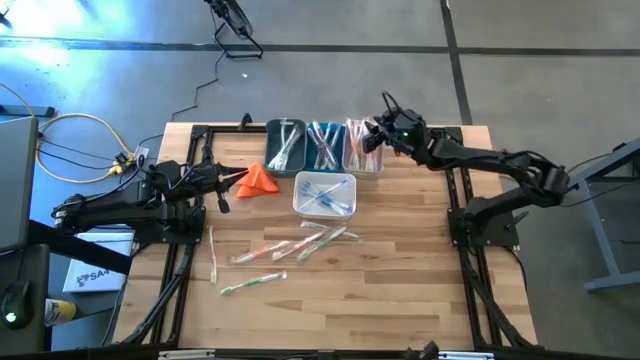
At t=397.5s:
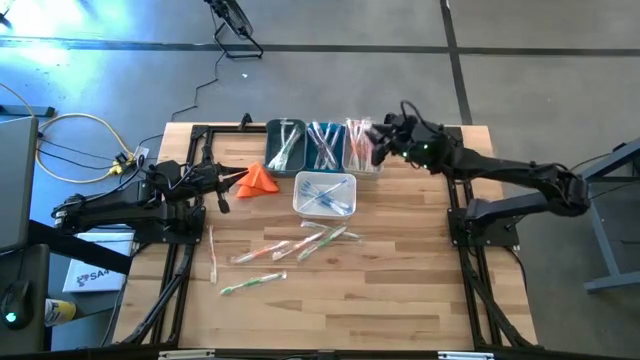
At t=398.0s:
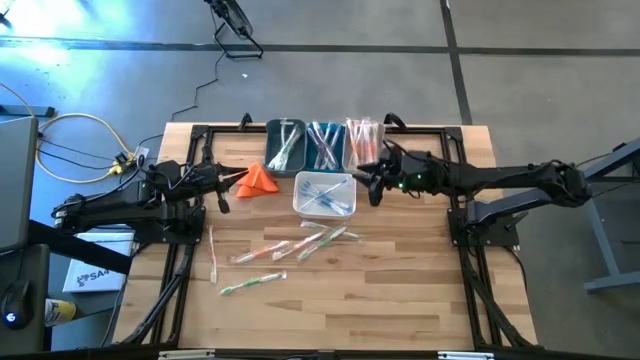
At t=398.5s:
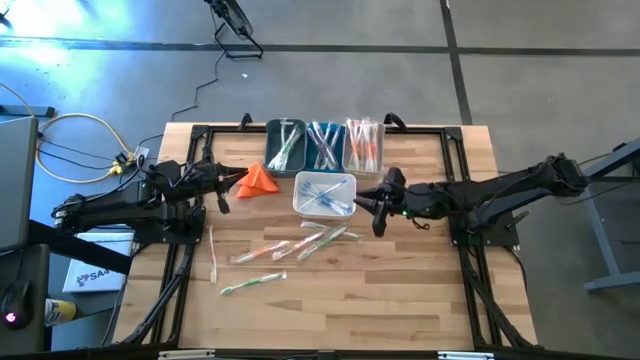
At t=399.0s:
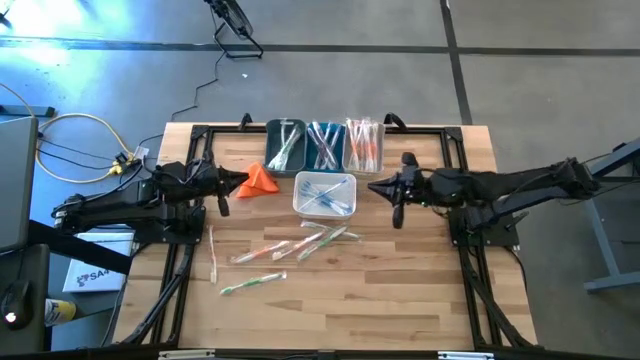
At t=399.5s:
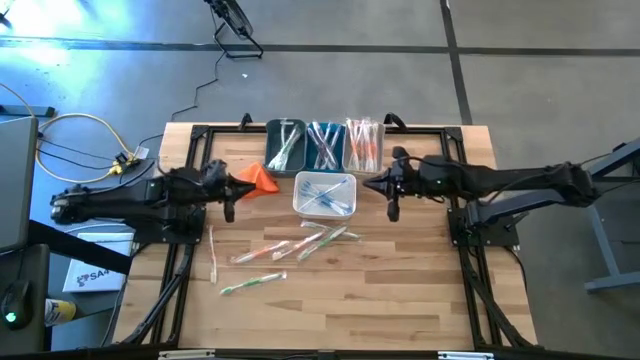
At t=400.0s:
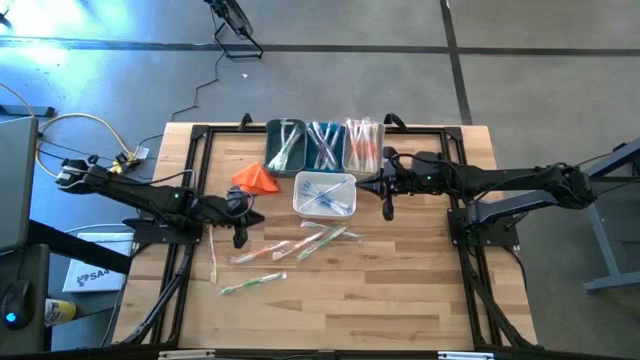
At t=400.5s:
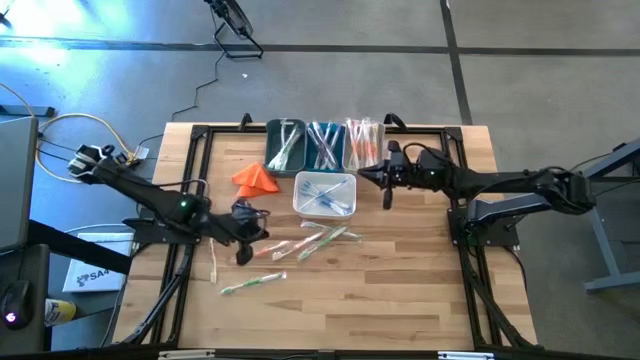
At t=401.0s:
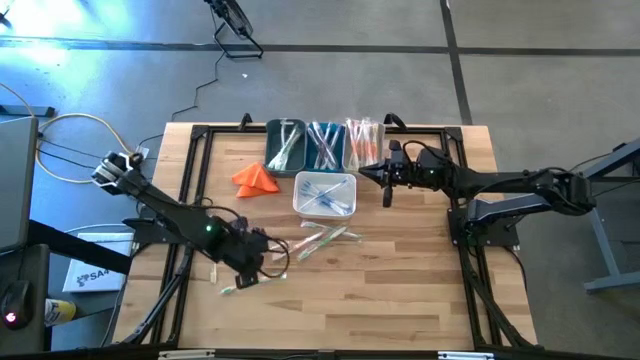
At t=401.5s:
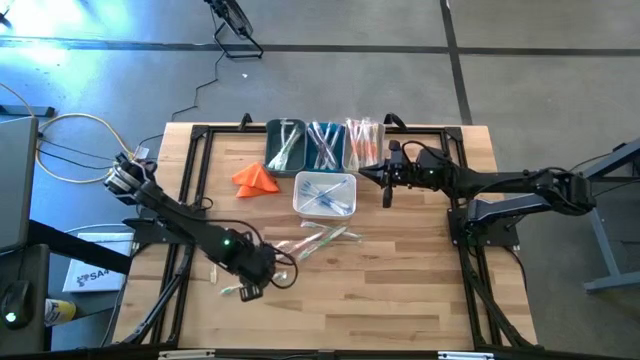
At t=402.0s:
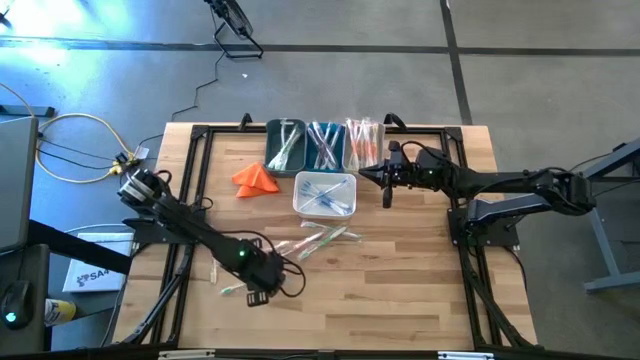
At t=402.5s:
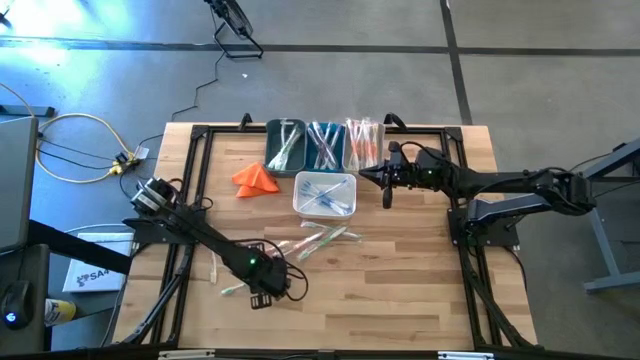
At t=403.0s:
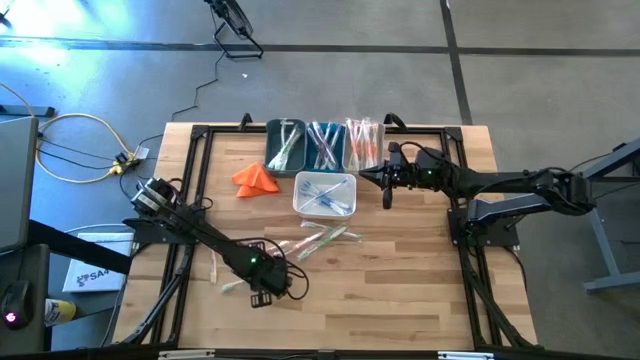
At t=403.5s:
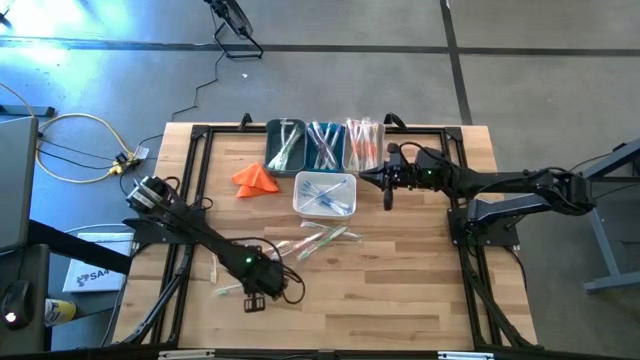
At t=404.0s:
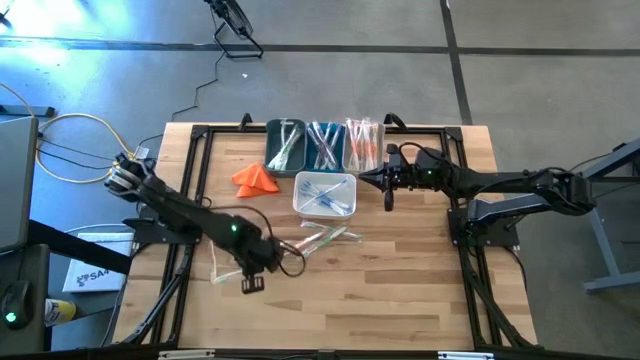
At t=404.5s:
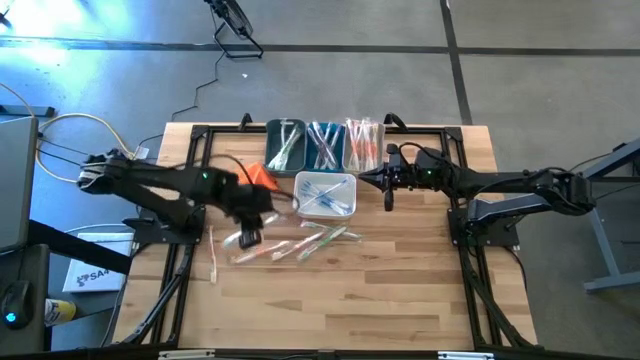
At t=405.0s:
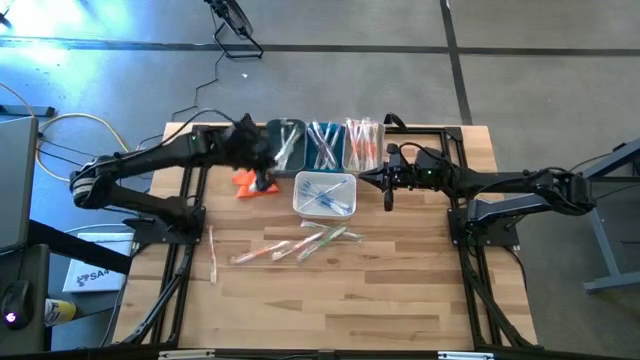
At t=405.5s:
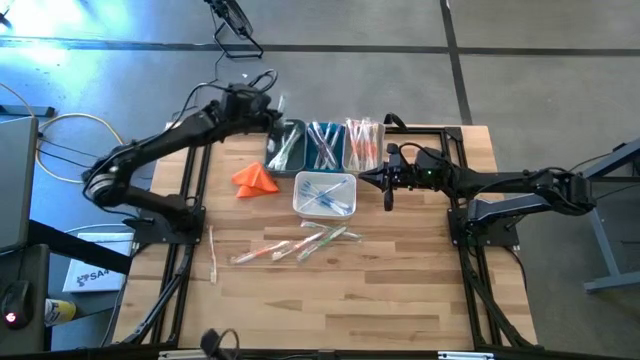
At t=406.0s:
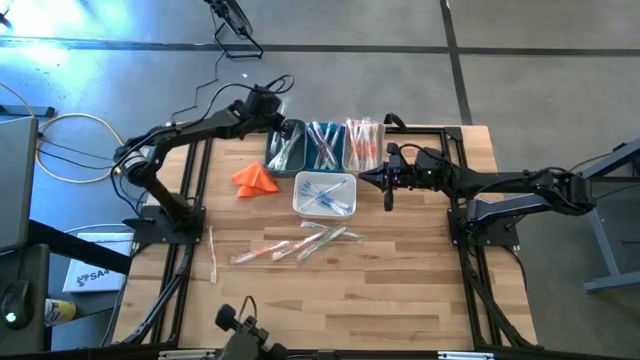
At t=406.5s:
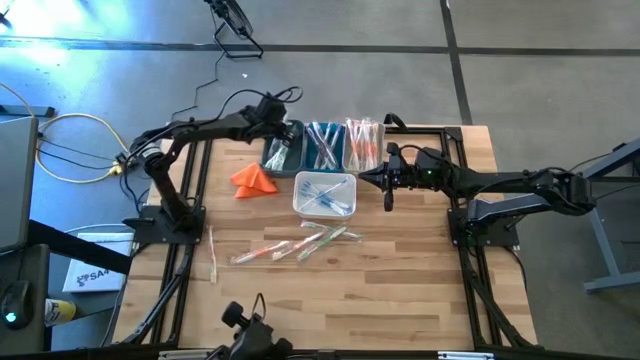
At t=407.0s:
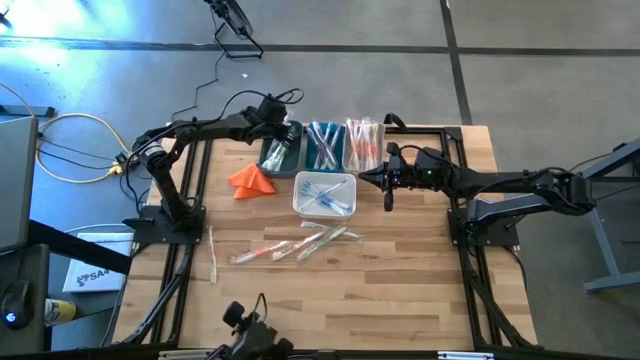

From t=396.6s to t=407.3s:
Task: Pick & Place Toothbrushes
Put the green toothbrush into the dark blue bin

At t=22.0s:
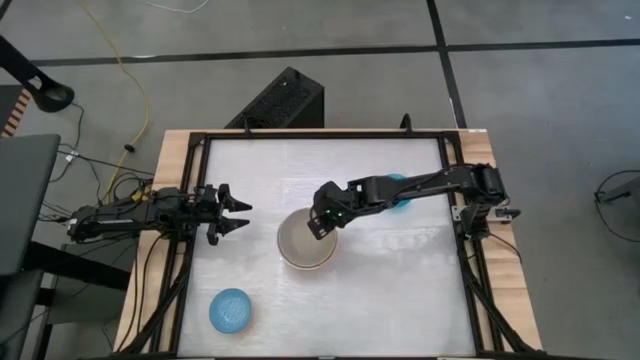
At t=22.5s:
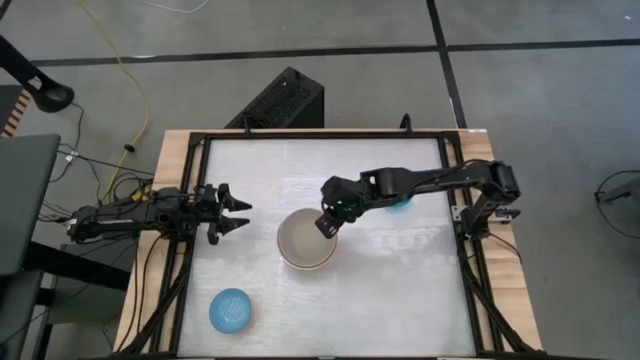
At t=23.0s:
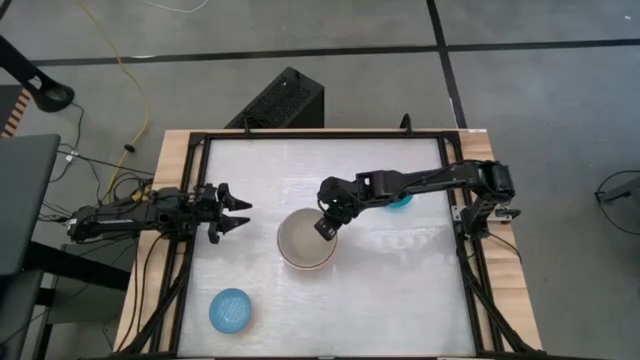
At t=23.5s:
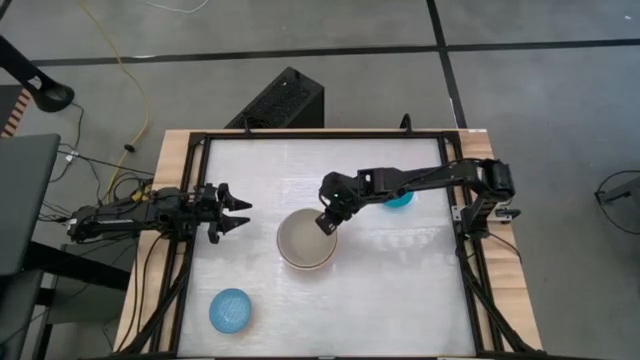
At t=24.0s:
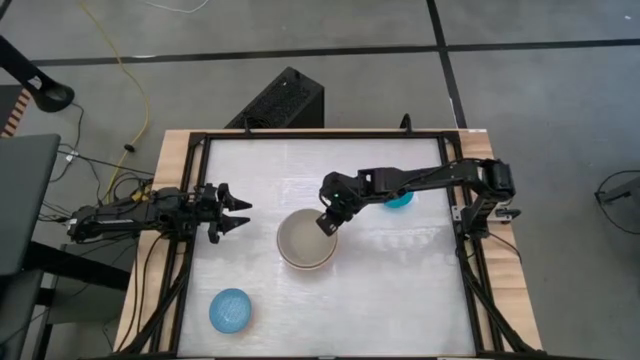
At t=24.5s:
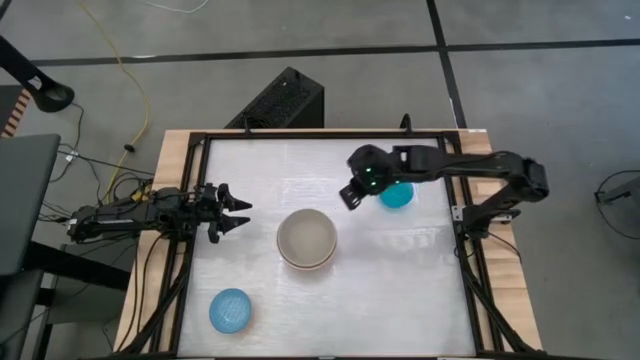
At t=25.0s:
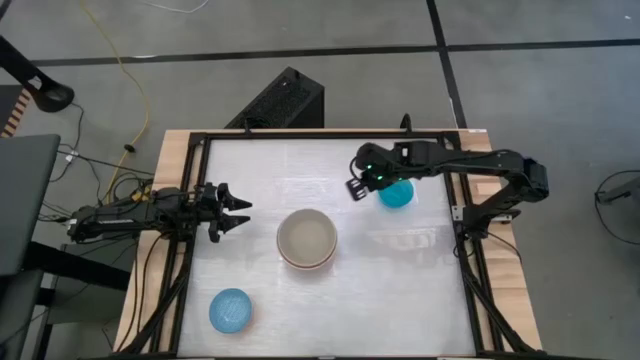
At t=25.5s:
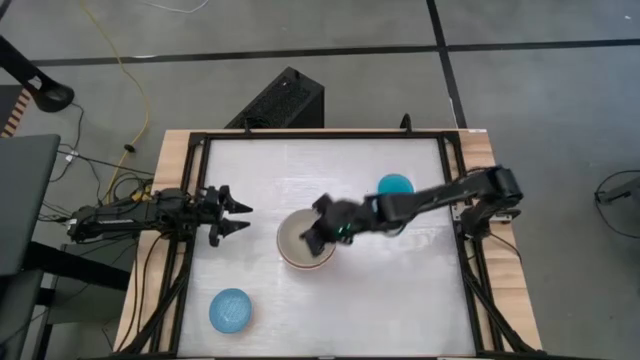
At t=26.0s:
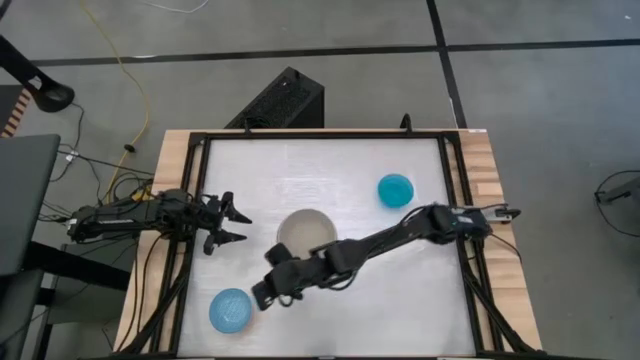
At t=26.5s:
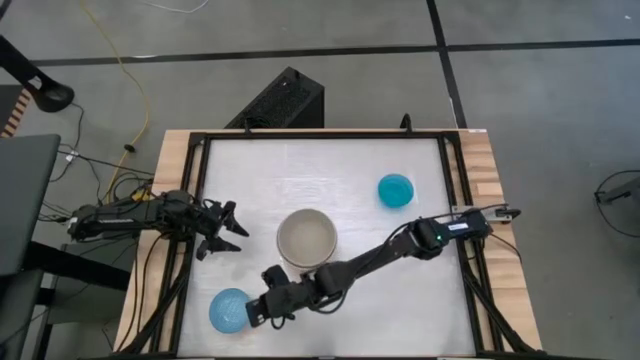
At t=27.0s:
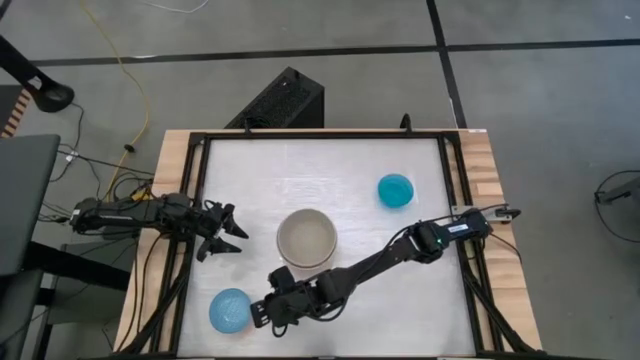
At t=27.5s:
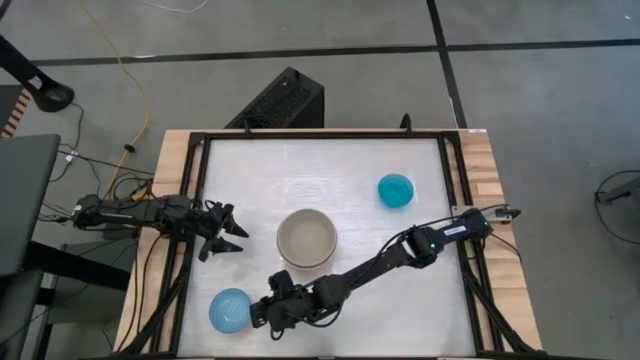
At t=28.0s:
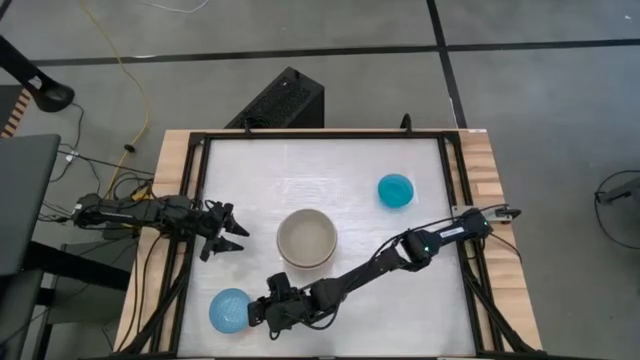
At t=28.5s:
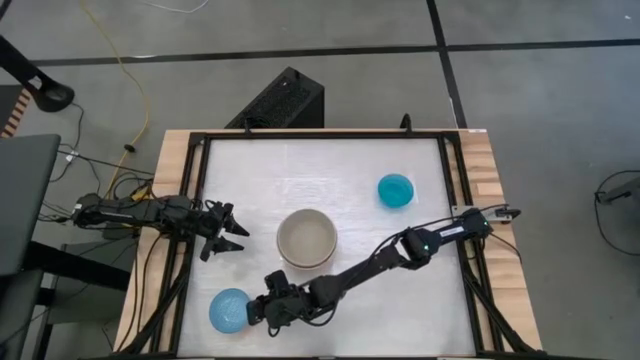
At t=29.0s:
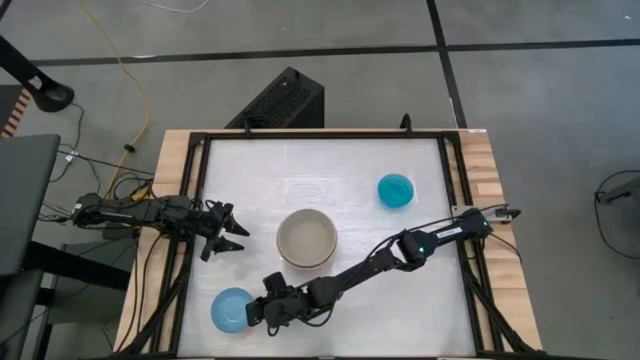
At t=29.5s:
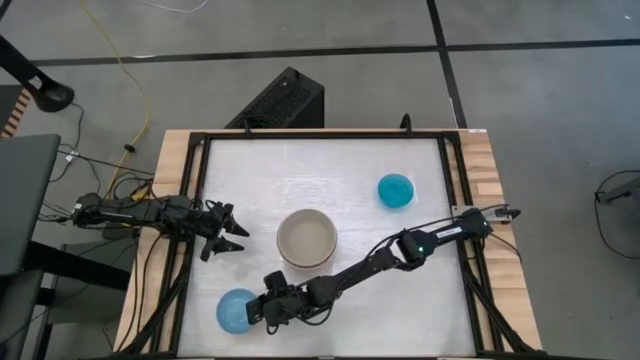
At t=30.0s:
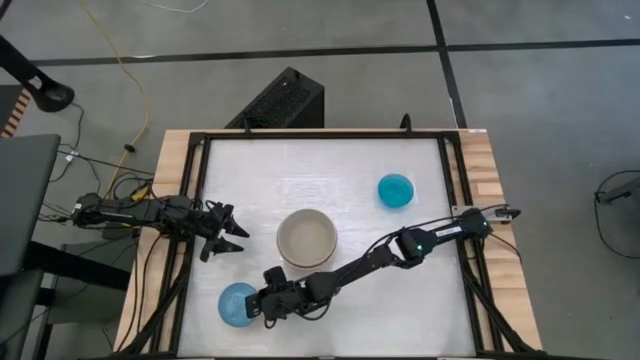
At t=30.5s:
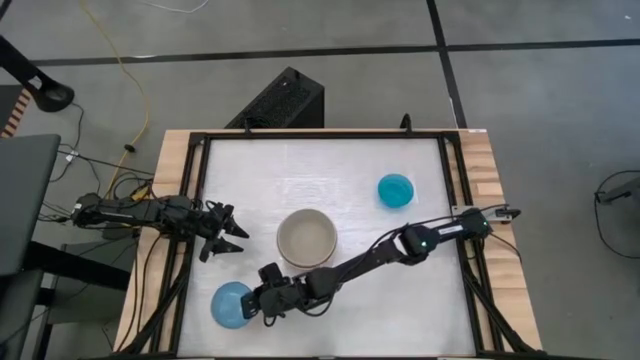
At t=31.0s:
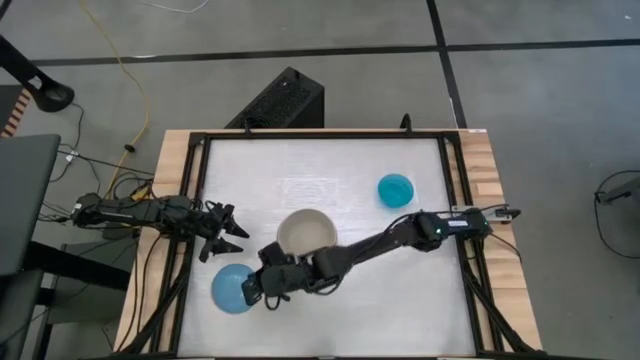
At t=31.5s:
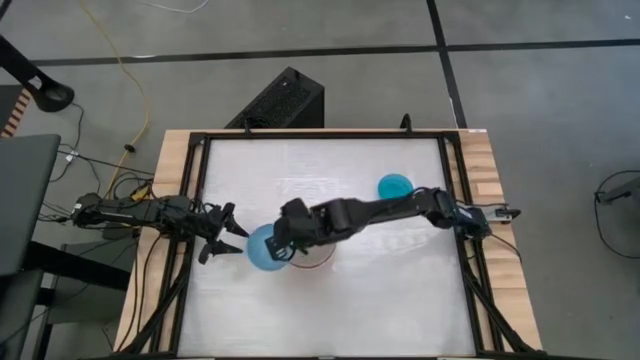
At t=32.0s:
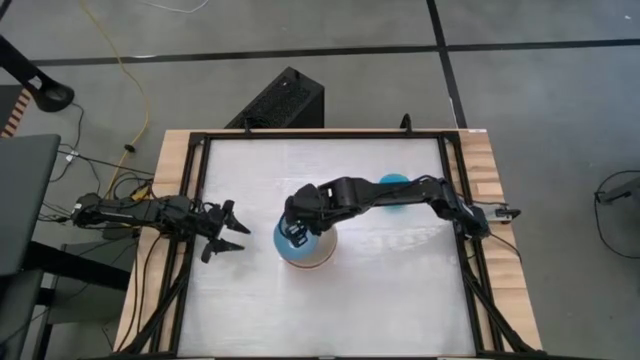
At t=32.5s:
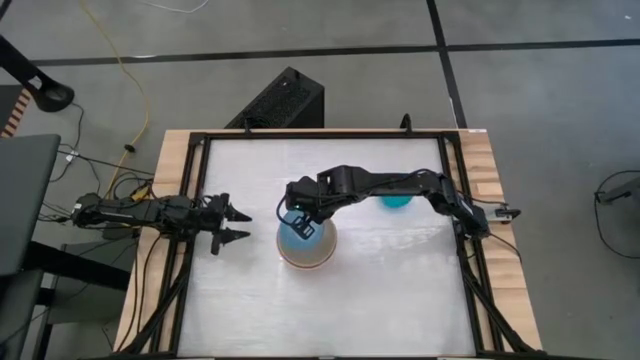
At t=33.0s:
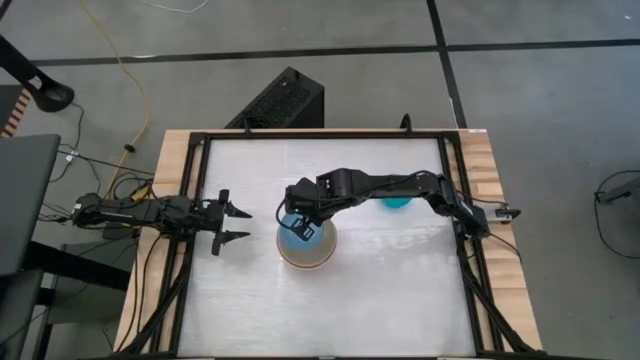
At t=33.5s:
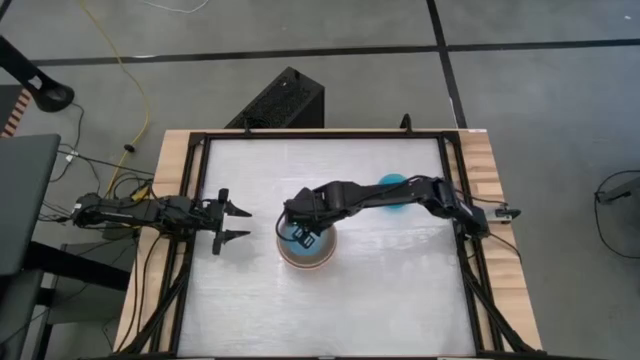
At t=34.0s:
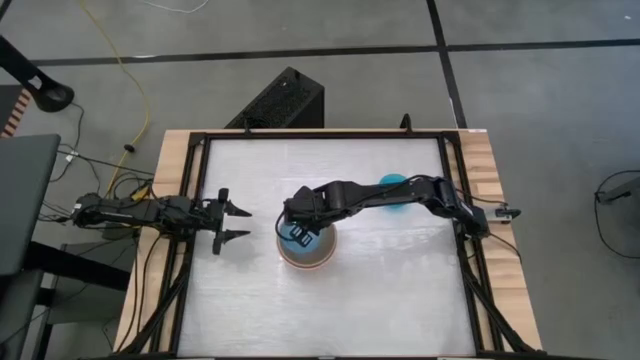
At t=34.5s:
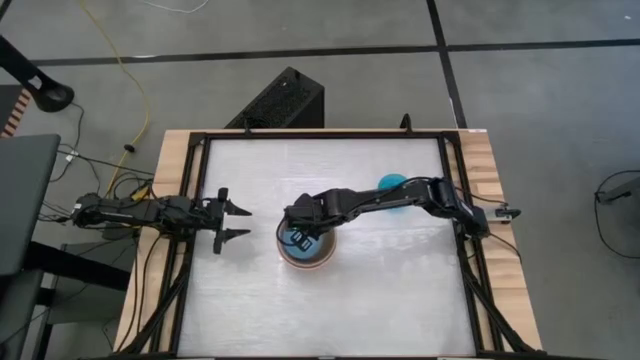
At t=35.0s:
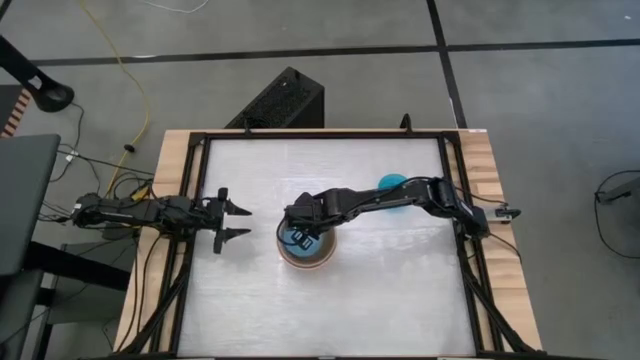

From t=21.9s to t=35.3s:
Task: Nest bowls inside each other by size order
Stack the blue bowl on top of the gray bowl
